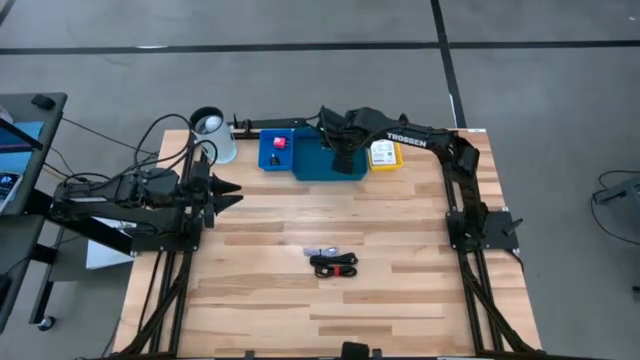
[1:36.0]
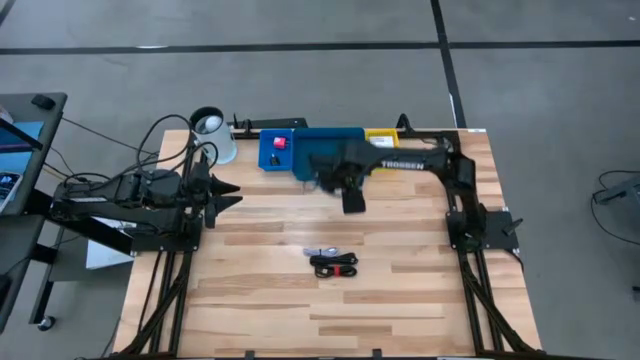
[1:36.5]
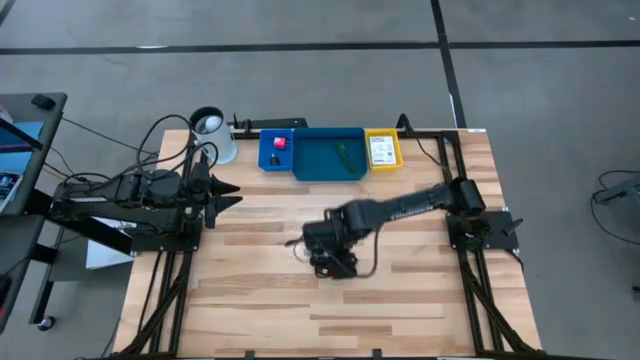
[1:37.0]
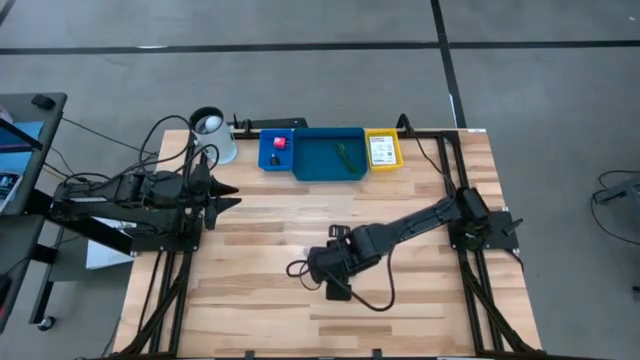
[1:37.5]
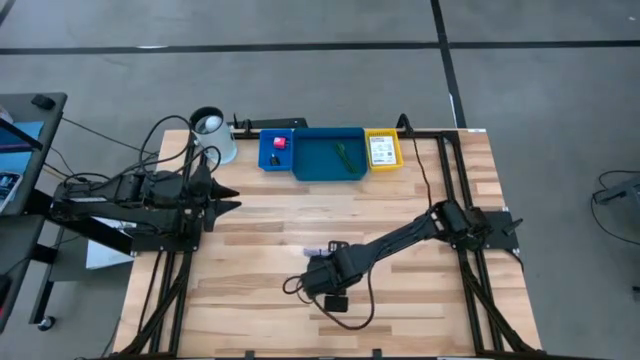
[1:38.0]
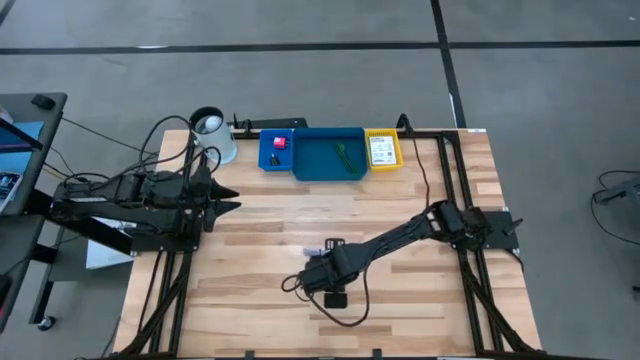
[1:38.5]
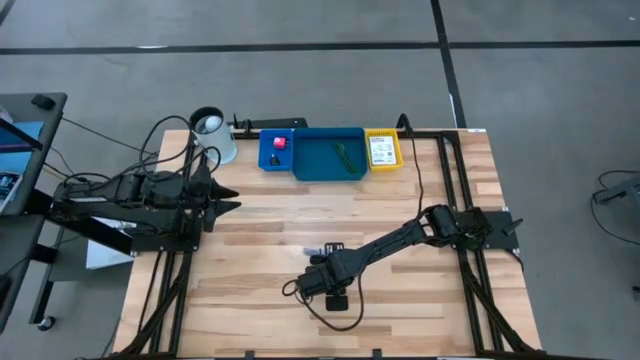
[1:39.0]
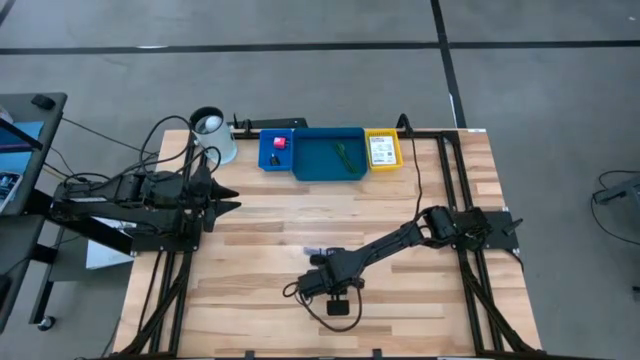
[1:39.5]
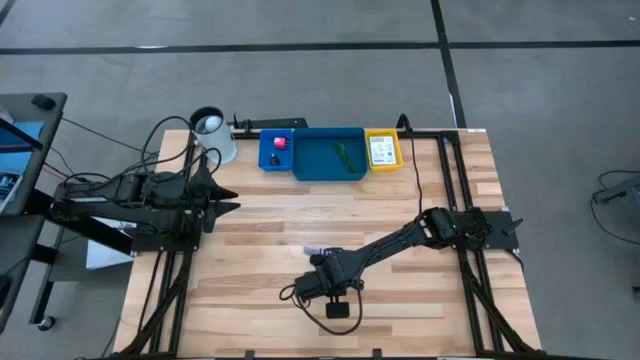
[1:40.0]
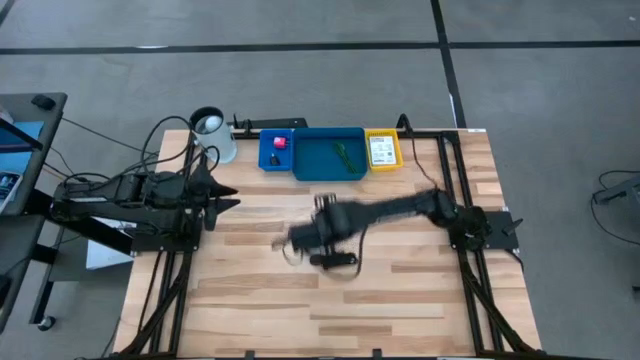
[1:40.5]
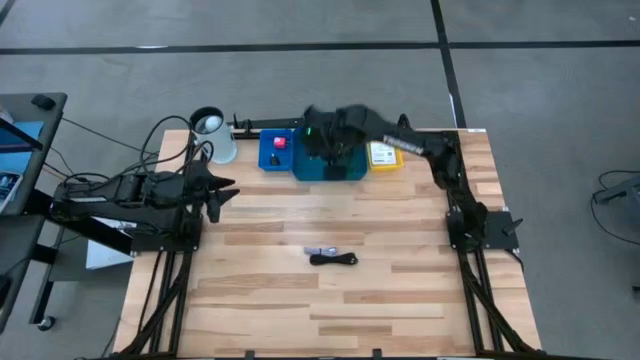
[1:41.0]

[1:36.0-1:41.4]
Task: Pick and place items into bin
Put the bottom black charger cable into the dark blue bin

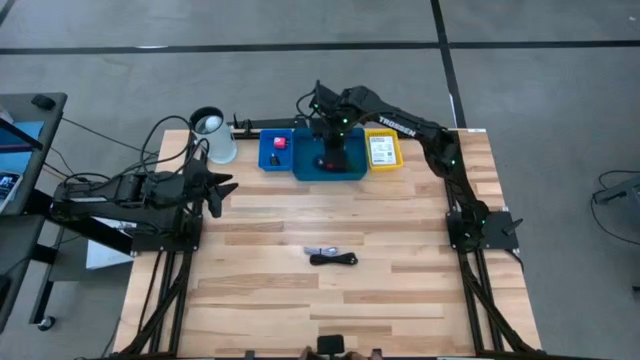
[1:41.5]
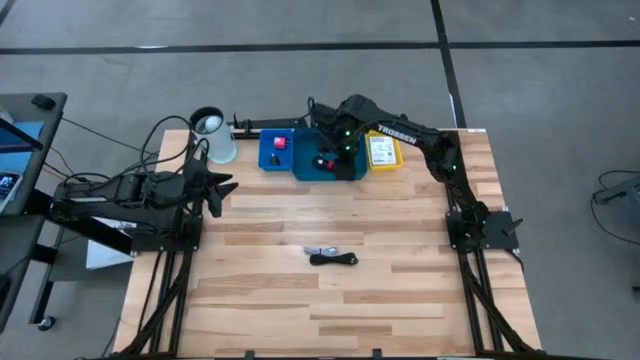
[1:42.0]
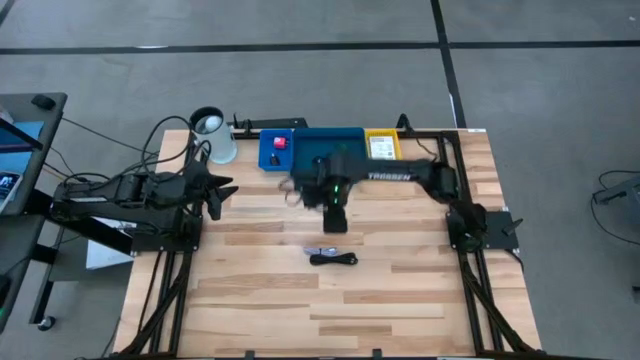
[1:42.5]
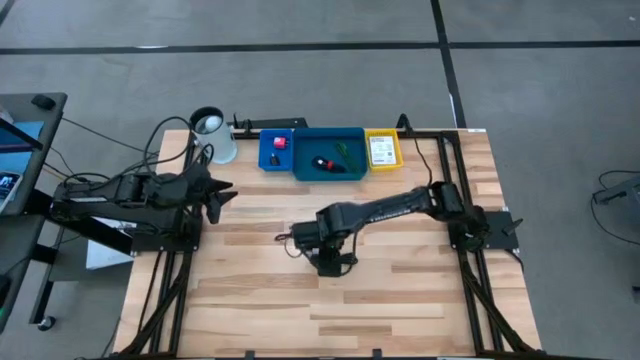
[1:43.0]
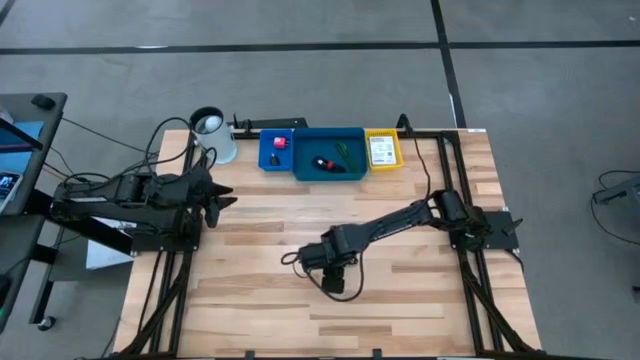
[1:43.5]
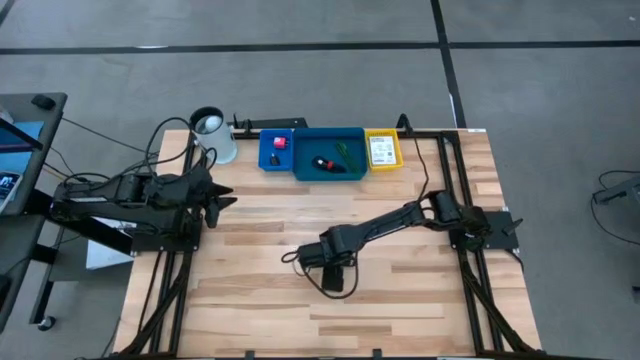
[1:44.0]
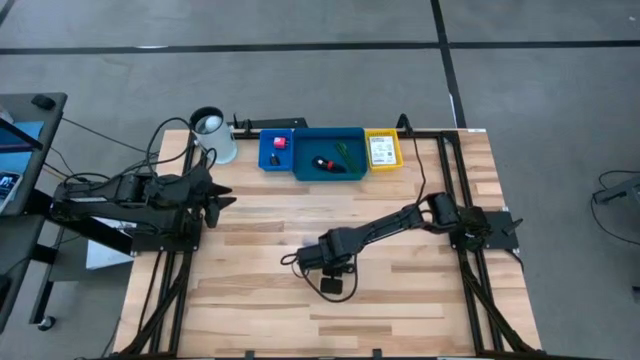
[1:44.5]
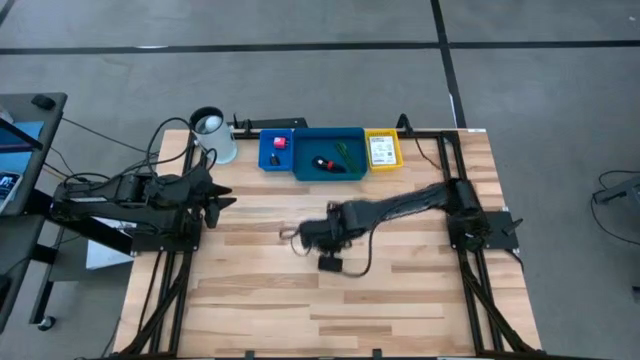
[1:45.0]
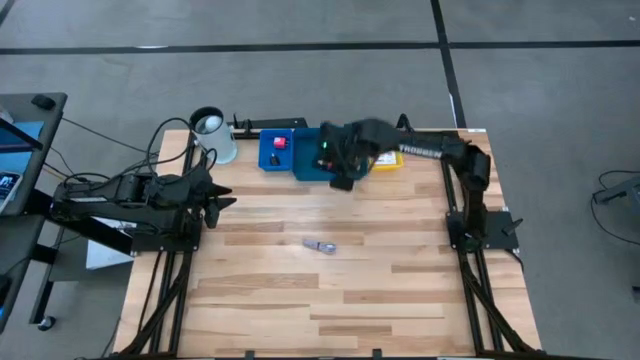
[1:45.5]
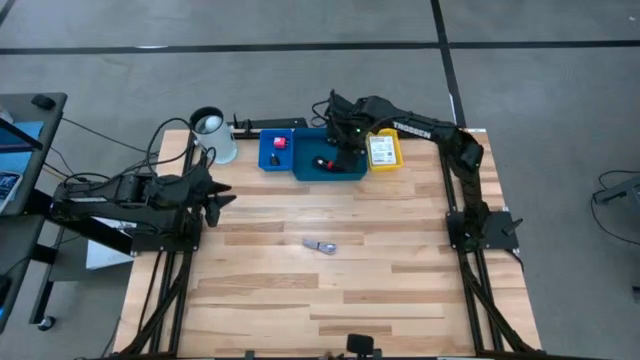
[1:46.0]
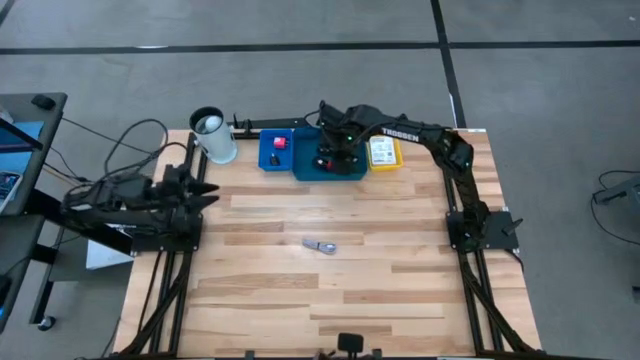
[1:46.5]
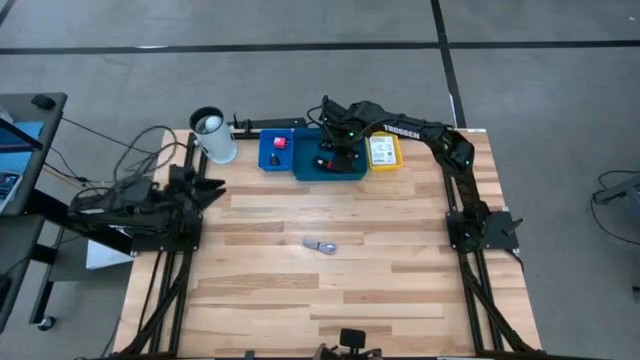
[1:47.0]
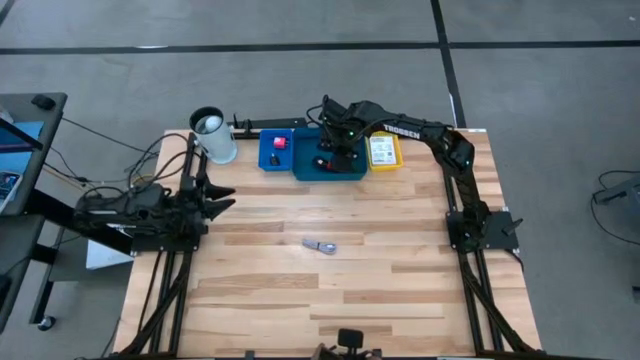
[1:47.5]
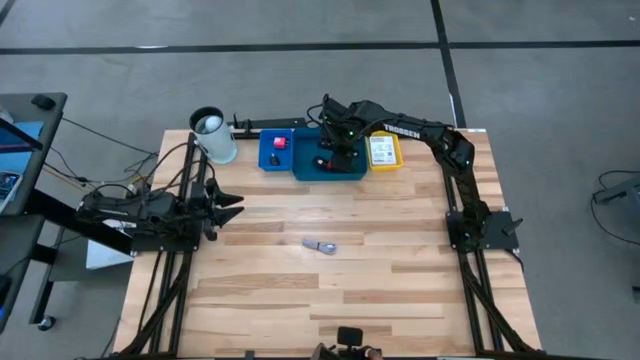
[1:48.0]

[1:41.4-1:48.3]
Put the black charger cable into the dark blue bin

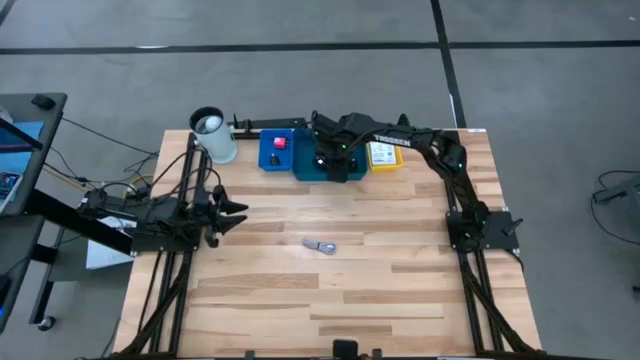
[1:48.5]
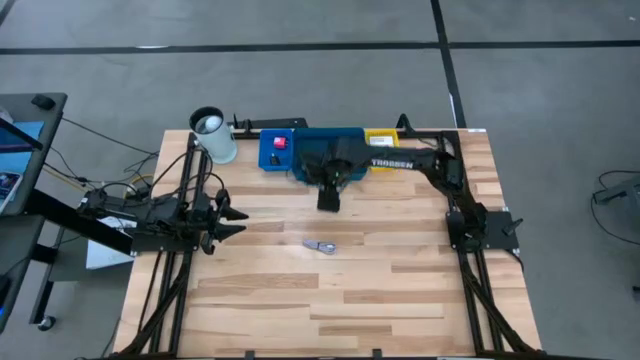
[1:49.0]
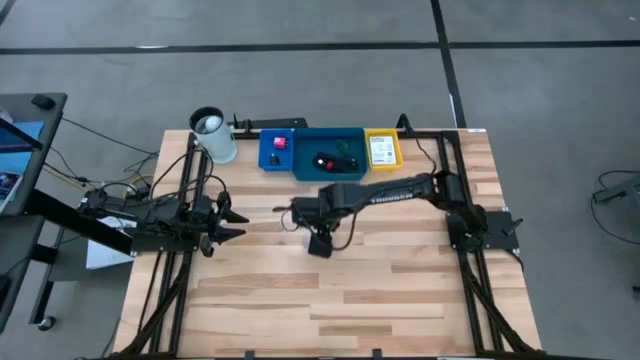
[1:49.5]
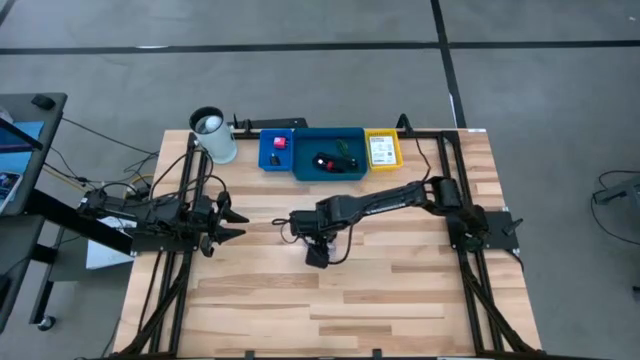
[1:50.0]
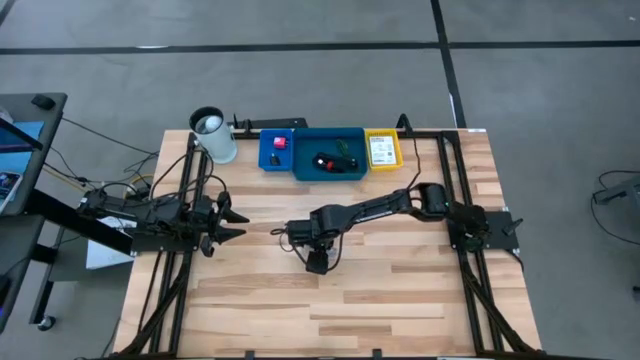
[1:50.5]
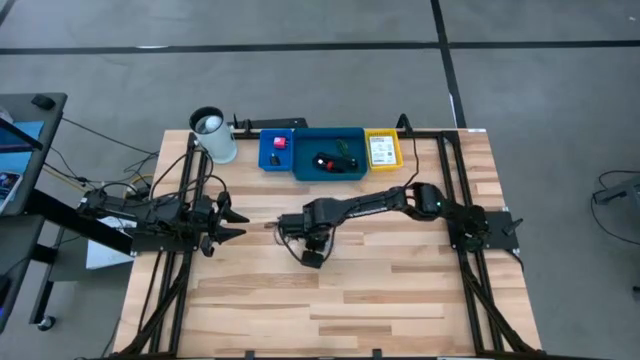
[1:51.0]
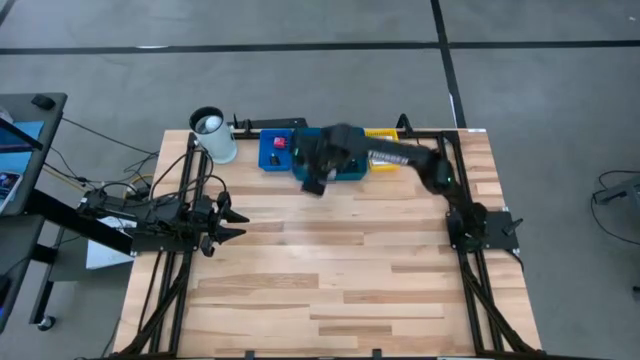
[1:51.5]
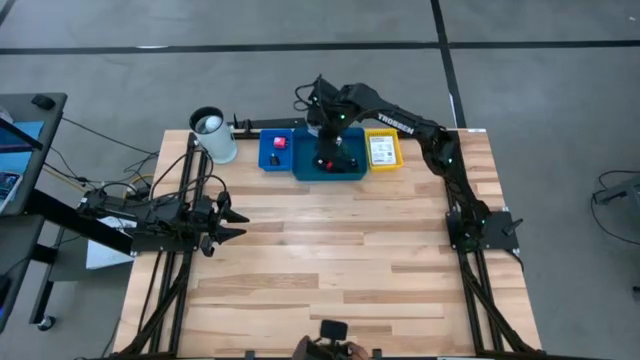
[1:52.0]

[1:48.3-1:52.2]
Put the white charger cable into the dark blue bin

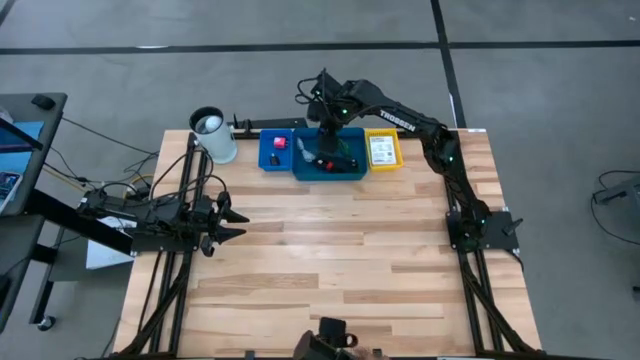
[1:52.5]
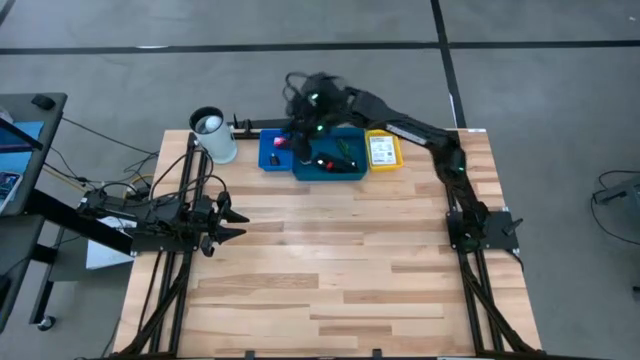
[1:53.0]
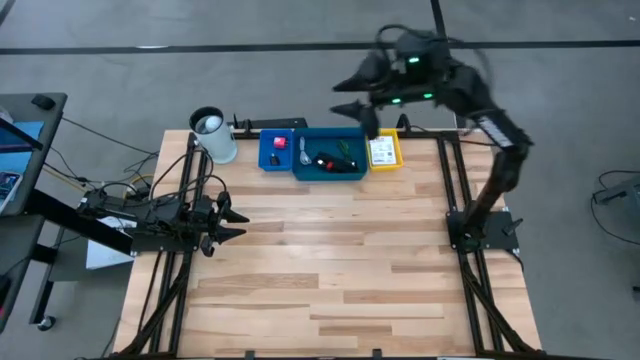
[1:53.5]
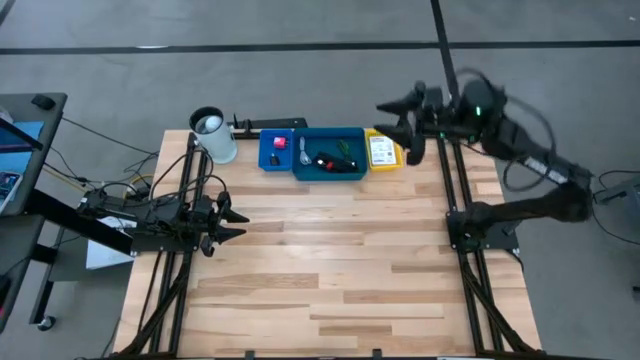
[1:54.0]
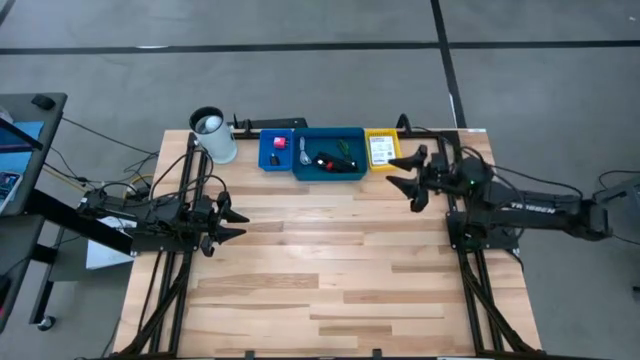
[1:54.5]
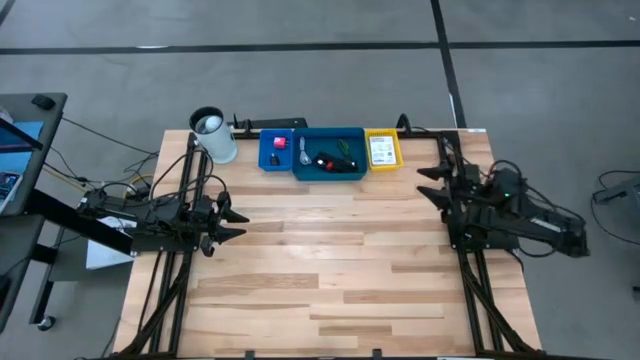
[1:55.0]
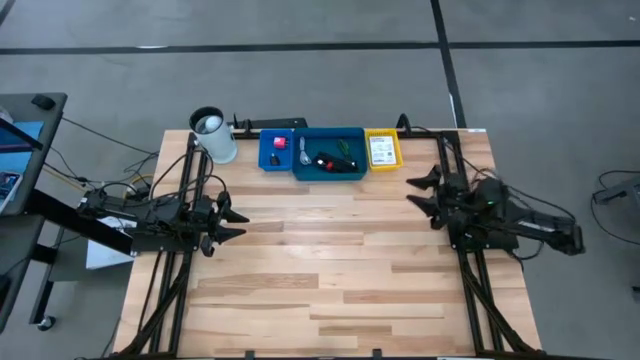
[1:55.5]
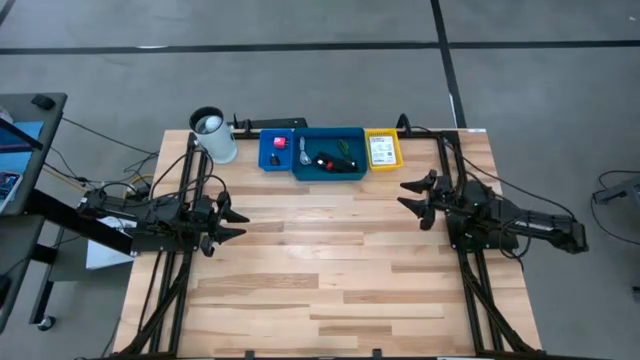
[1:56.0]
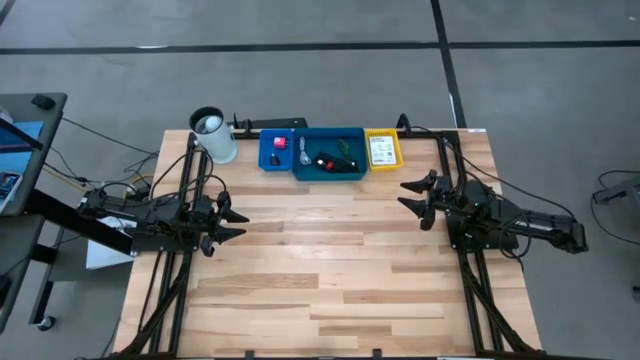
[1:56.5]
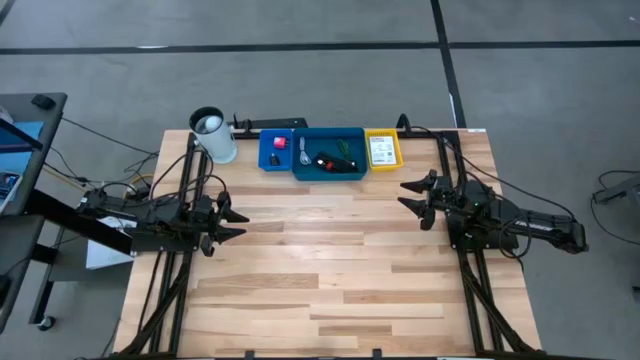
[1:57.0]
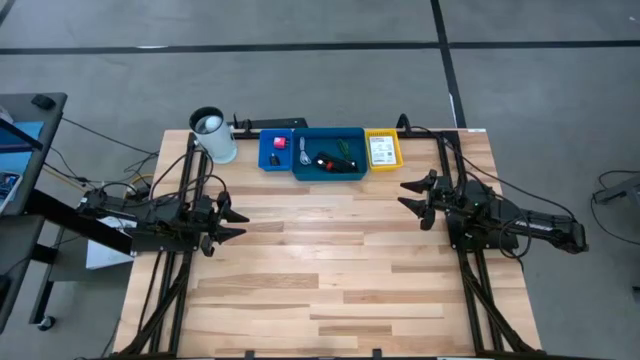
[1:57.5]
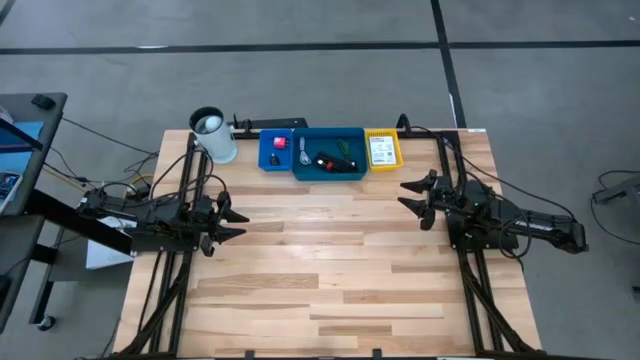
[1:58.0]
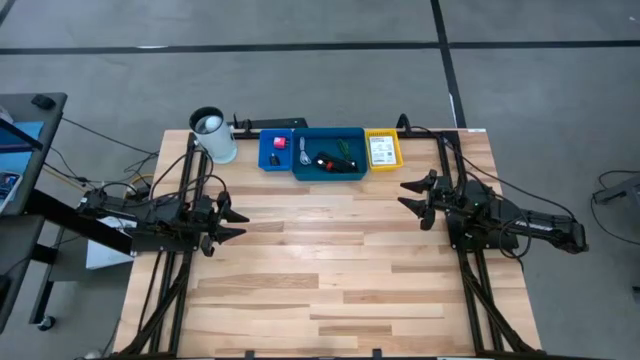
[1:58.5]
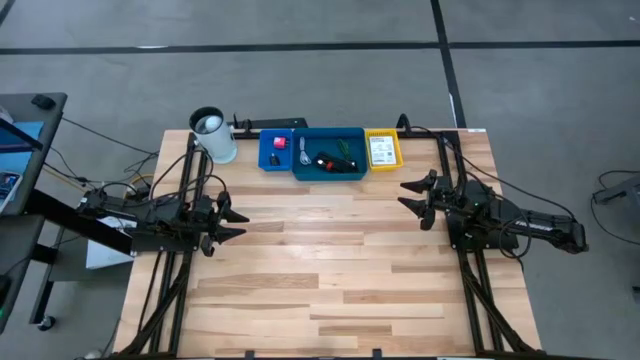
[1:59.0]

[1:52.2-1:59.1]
Return to Home Position
